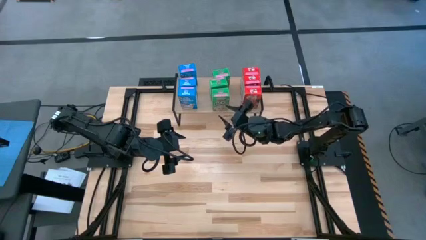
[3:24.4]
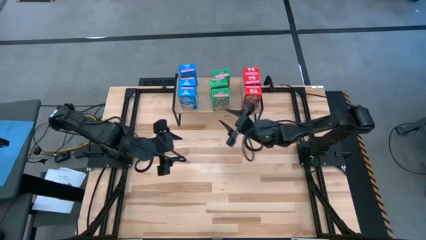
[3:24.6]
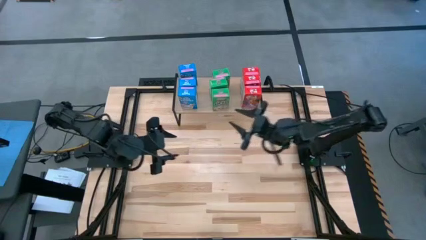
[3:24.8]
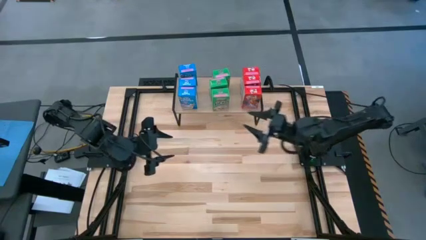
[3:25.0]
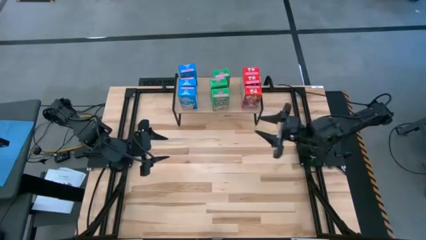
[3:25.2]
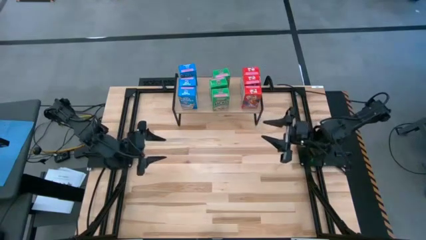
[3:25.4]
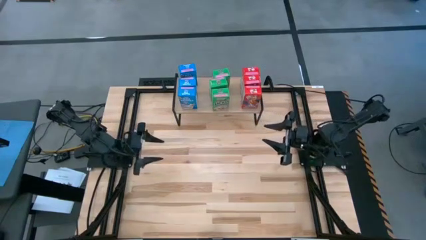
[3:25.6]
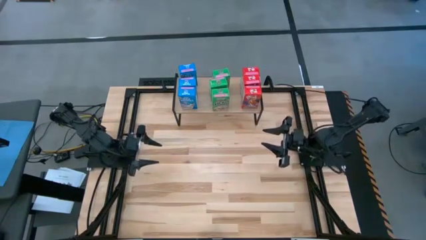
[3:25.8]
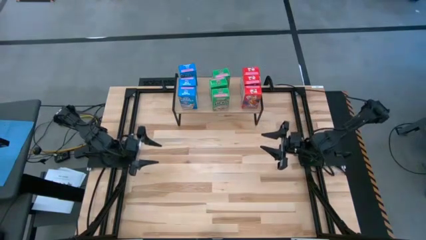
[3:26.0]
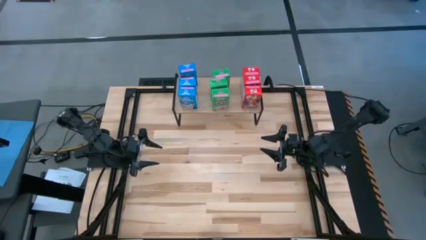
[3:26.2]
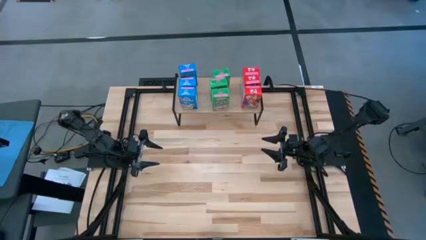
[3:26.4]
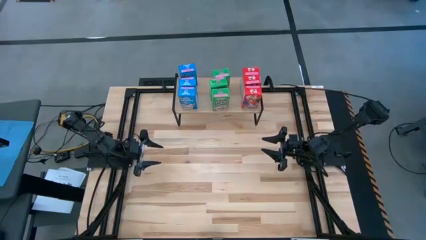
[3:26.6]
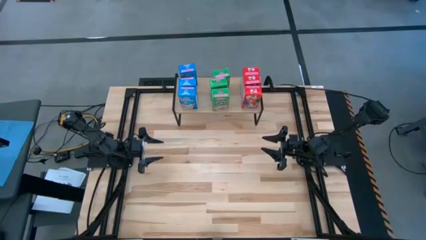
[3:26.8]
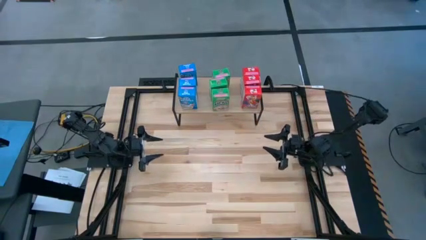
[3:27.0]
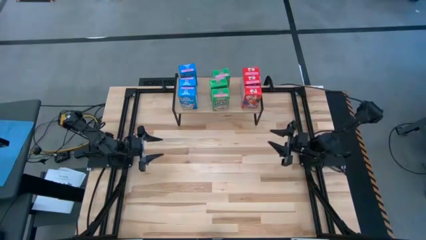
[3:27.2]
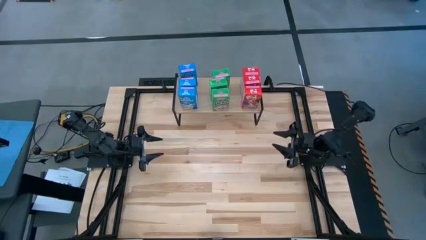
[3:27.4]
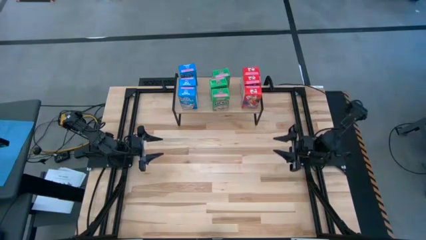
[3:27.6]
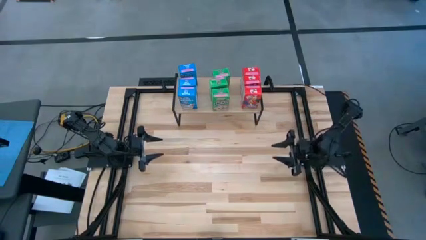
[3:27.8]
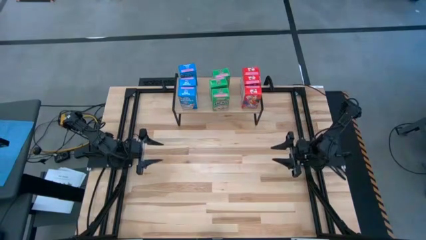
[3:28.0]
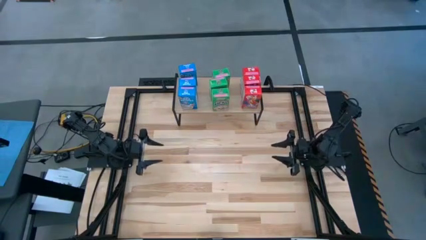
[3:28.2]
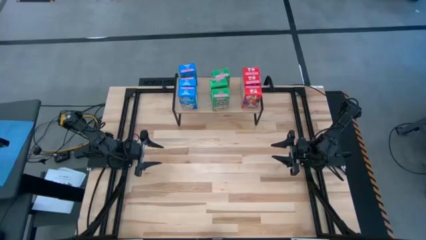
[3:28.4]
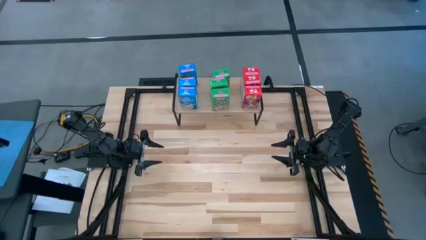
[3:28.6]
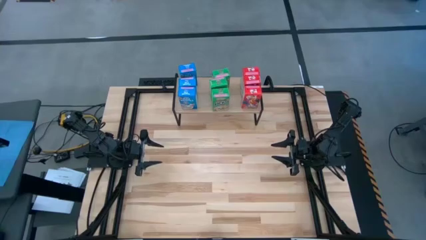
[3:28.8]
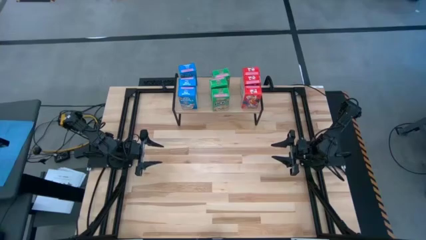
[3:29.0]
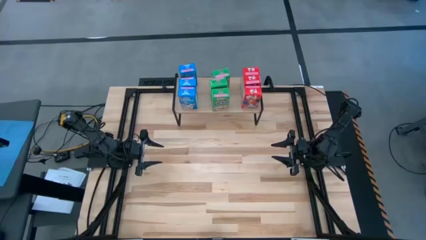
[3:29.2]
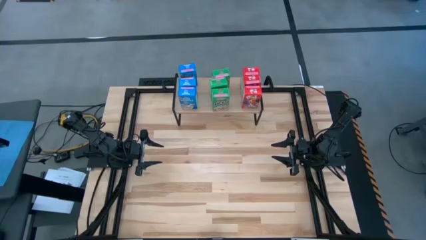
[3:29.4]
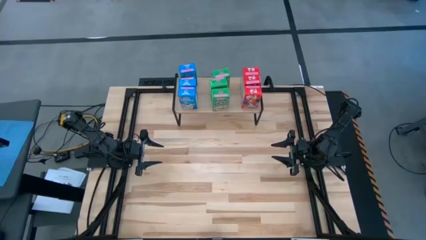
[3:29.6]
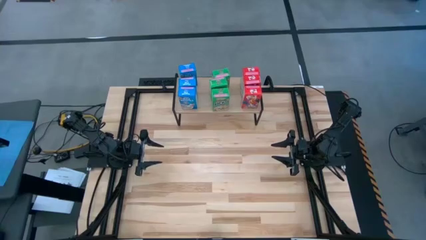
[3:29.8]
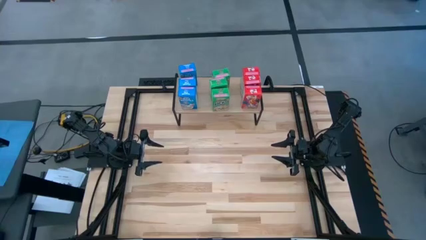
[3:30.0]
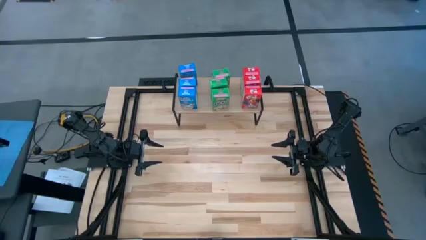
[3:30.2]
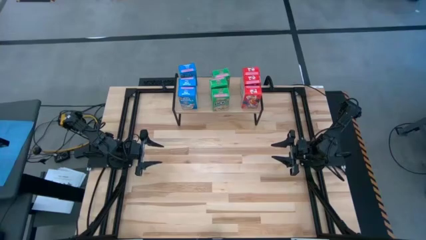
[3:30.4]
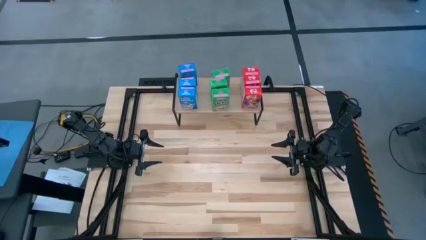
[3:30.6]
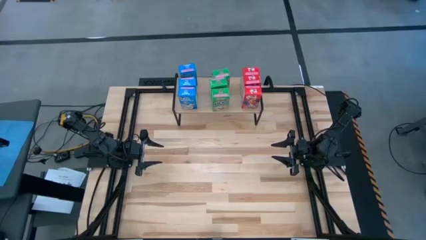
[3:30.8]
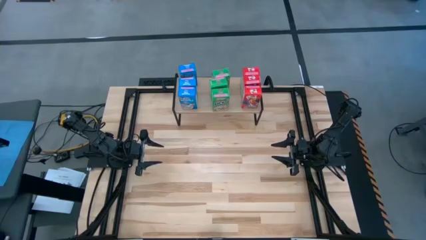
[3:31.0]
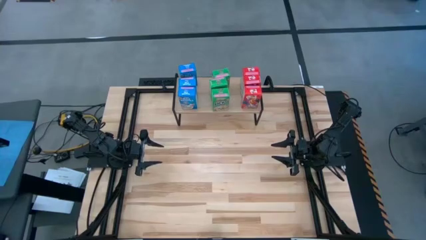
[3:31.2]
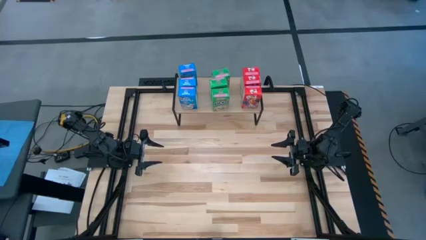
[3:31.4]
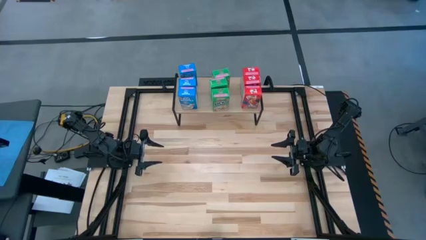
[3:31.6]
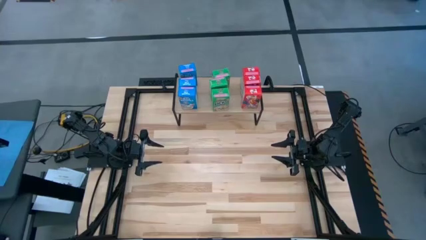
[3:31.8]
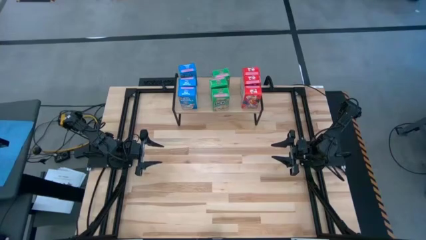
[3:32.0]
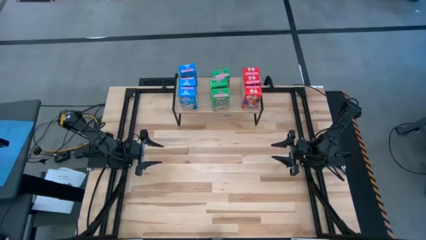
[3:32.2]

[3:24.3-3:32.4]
Task: Stack cereal on shelf
Return to Home Position

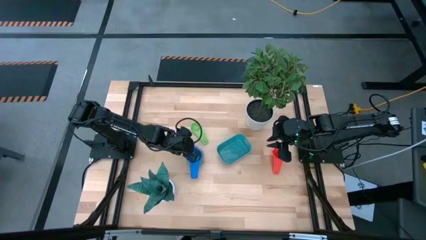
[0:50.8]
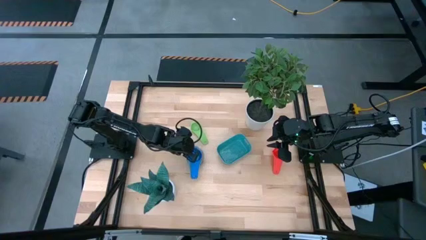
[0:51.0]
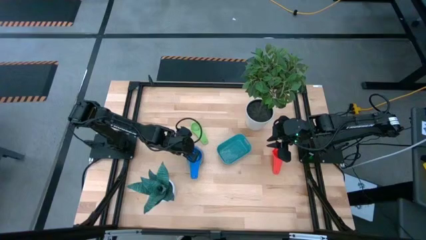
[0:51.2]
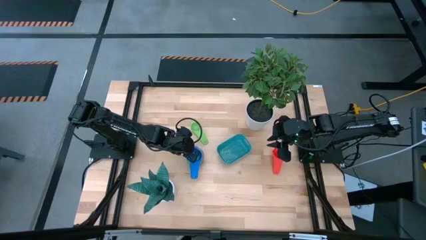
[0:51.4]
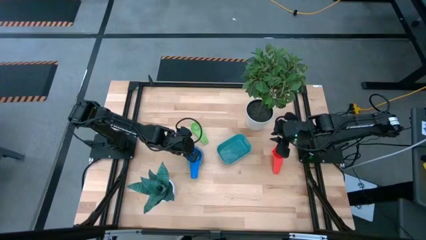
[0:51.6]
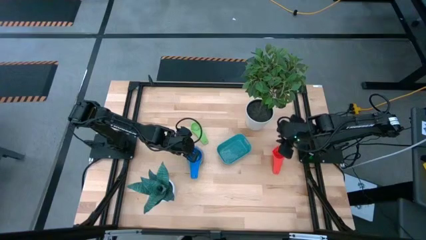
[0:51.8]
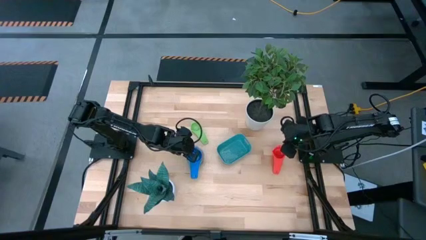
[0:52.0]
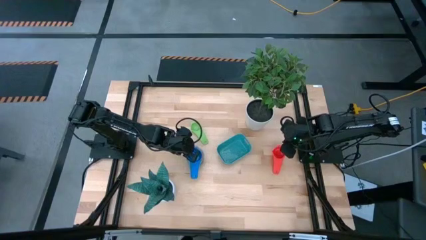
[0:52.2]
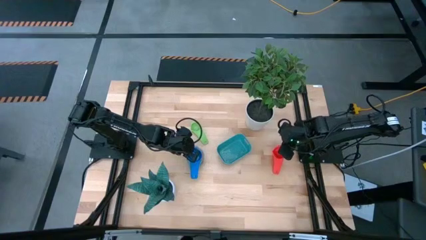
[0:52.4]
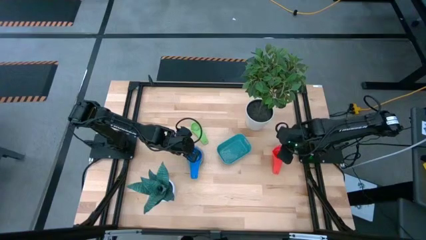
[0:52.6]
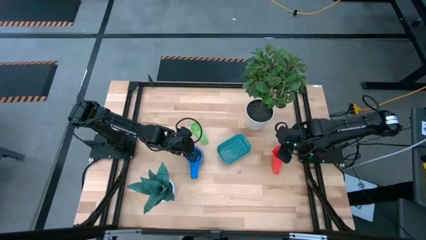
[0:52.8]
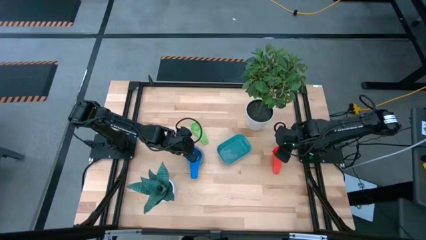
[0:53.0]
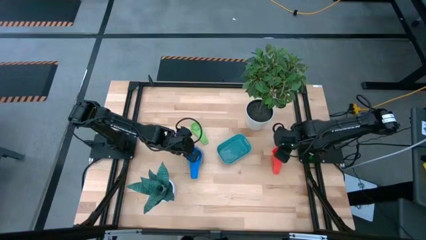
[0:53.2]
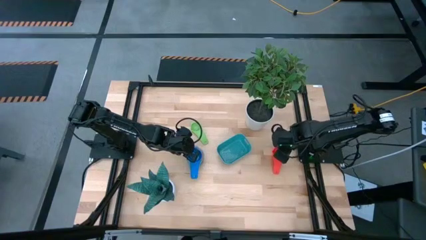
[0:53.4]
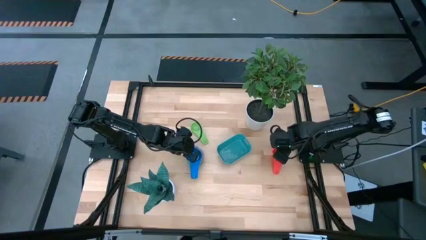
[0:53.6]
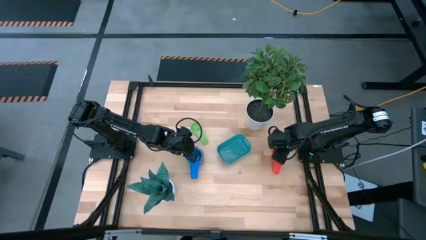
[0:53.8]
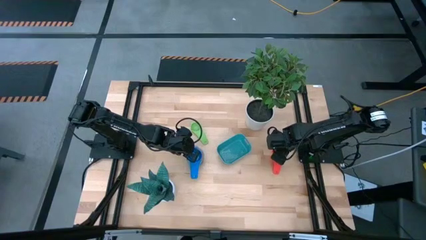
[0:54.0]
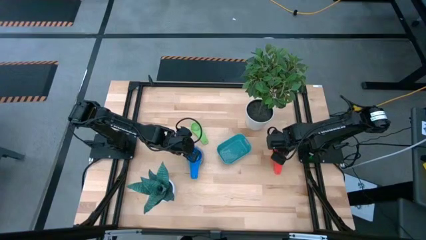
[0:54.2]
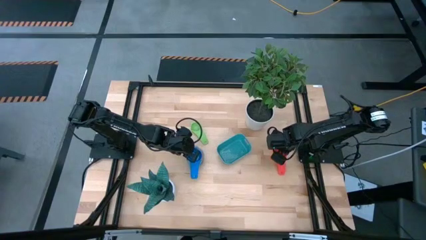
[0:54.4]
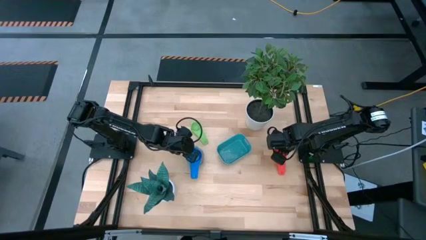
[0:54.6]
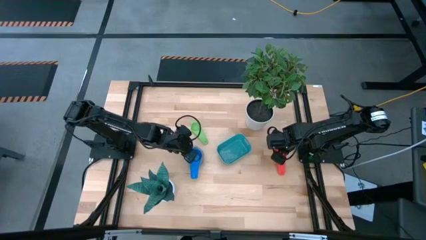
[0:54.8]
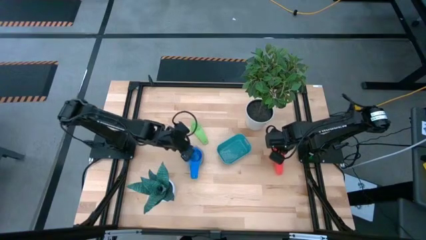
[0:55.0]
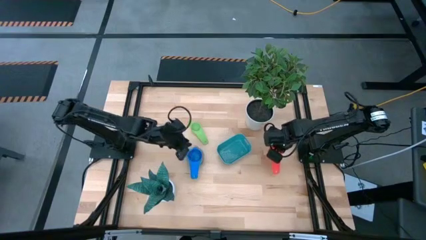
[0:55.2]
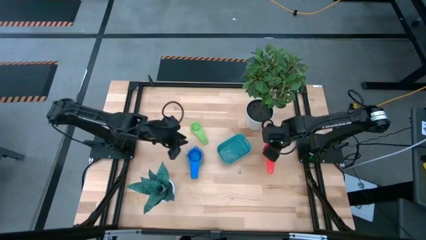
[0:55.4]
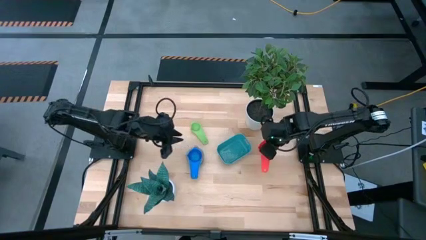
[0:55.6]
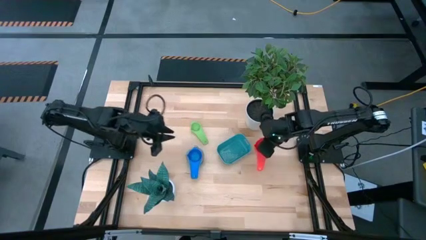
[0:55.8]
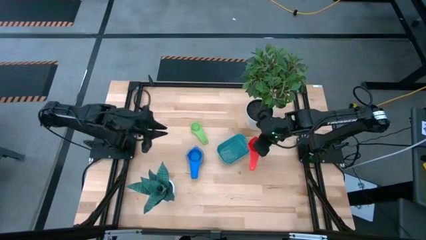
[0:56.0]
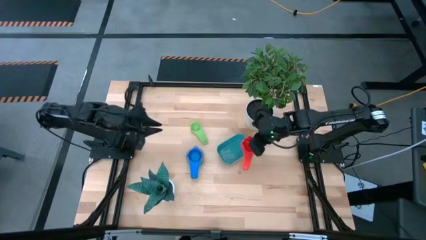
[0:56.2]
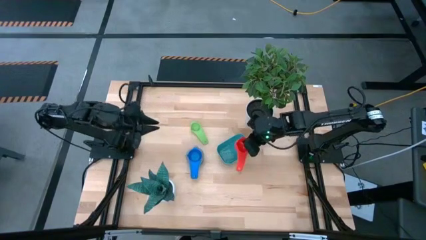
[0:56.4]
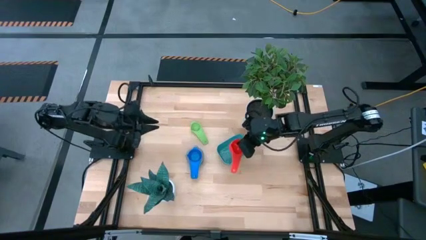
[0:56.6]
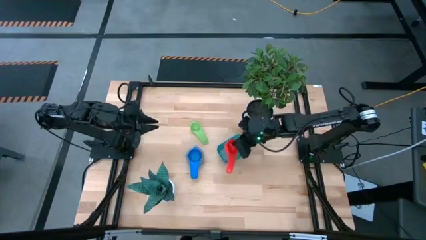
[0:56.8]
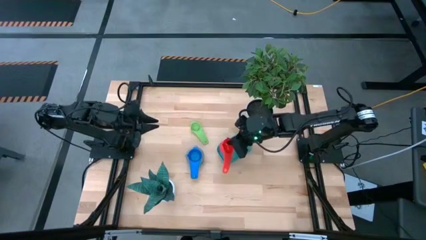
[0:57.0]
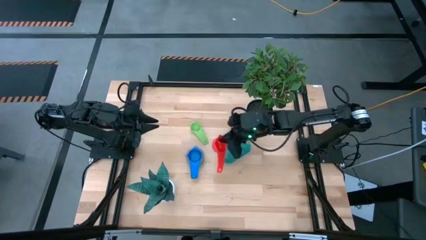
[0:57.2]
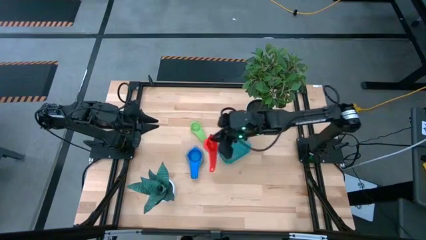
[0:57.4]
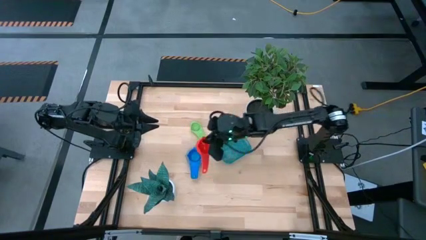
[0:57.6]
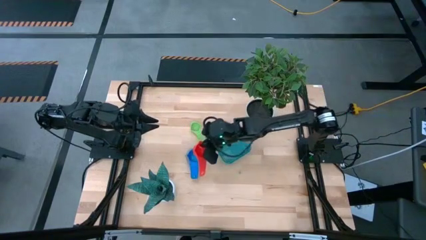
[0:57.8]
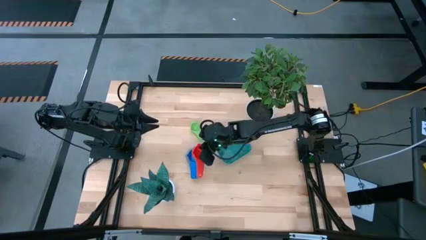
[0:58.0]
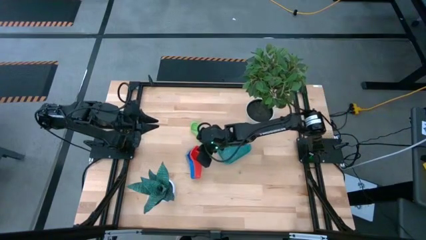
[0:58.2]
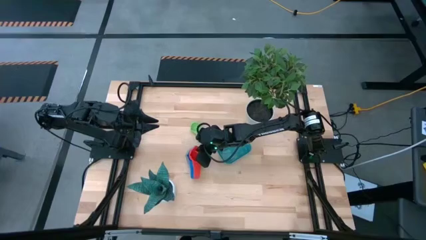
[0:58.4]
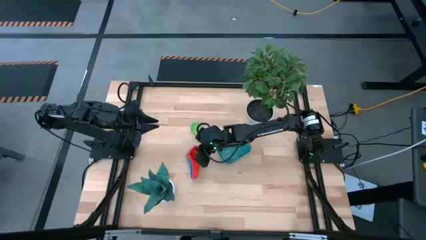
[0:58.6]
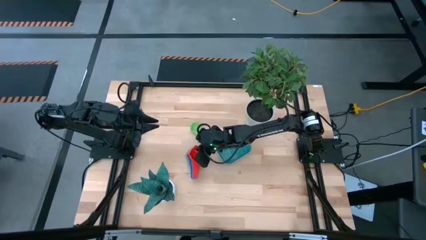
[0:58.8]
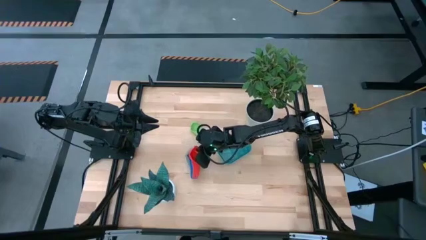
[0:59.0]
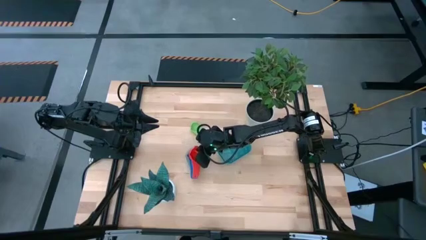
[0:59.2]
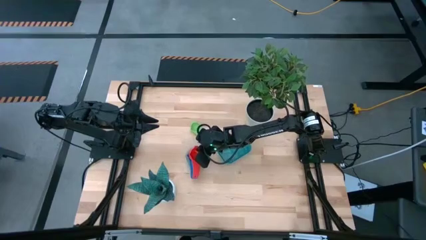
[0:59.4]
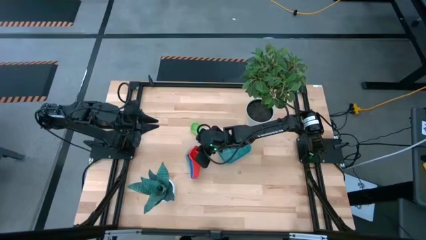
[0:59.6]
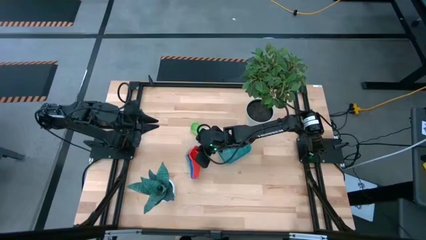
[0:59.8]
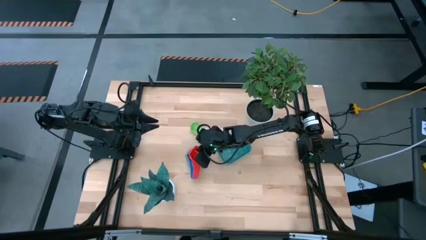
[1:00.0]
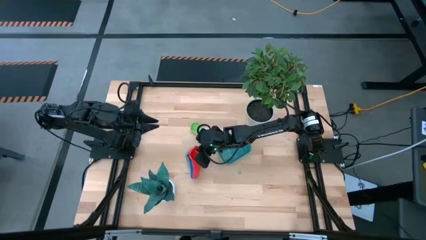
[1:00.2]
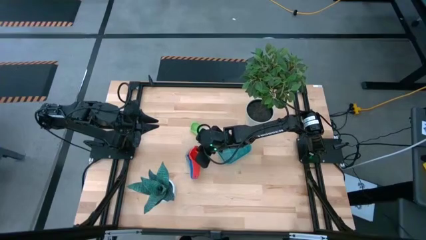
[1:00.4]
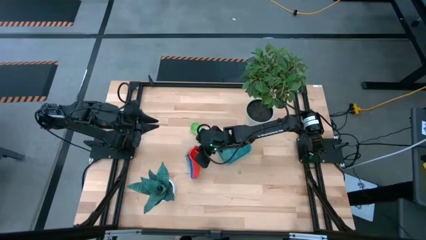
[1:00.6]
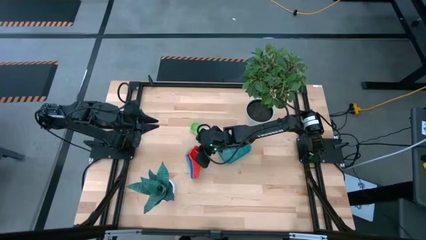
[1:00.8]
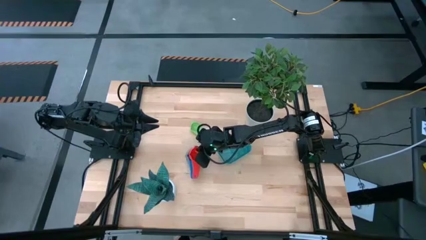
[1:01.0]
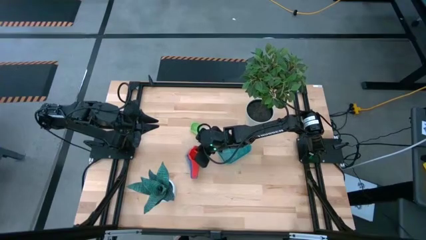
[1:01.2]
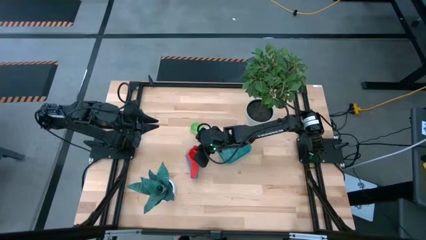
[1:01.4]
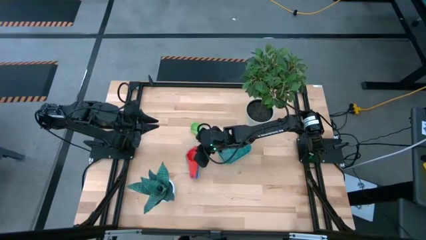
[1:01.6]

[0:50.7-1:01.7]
Task: Nest measuring cups in basket
Stack the red measuring cup on top of the blue measuring cup
